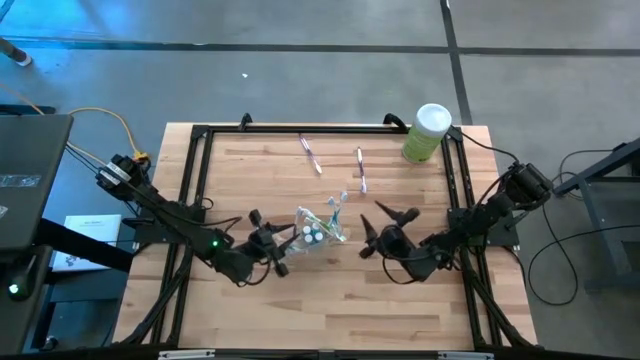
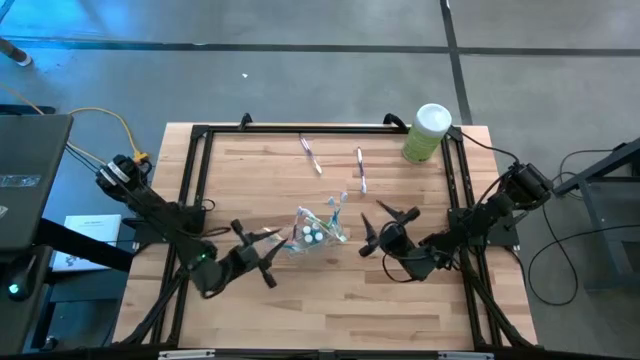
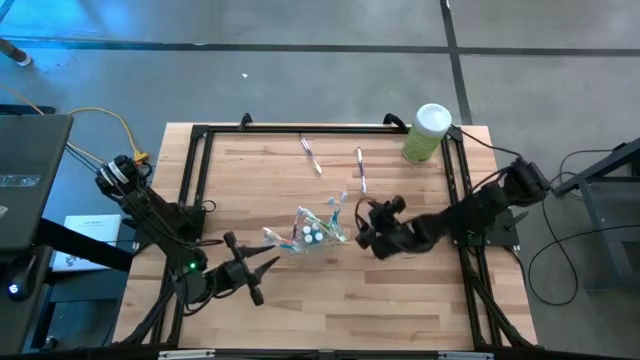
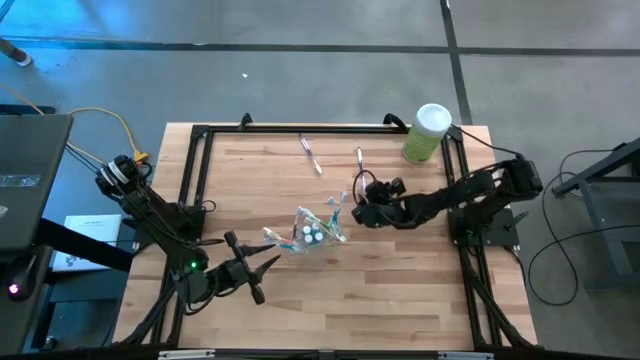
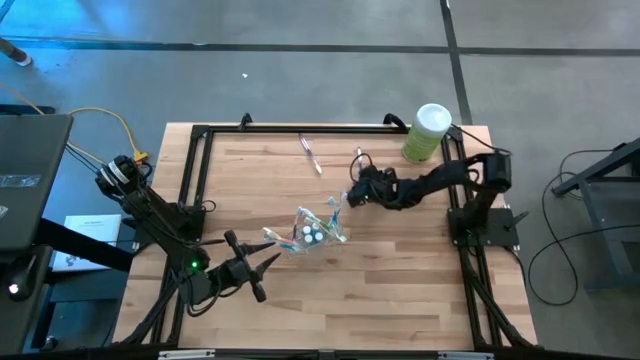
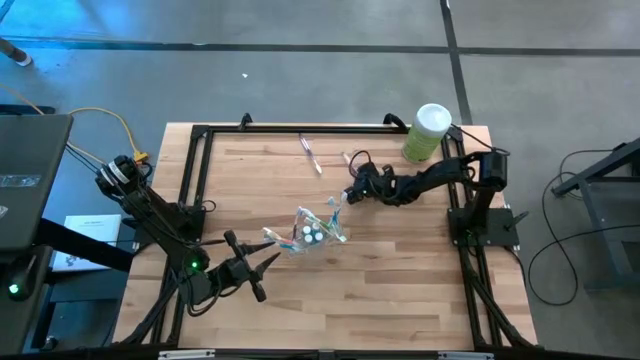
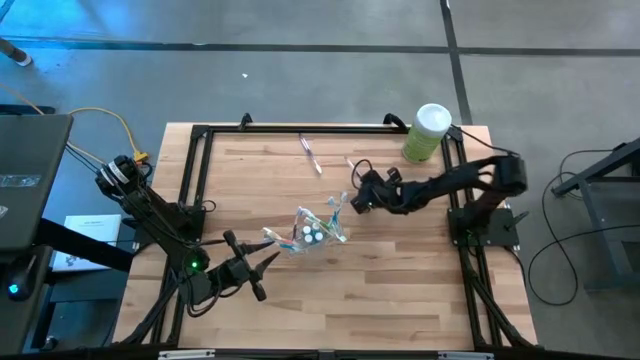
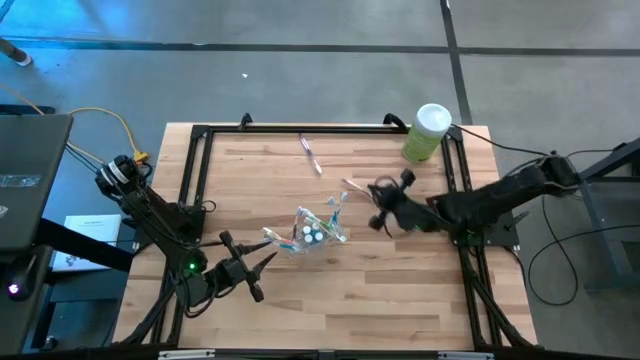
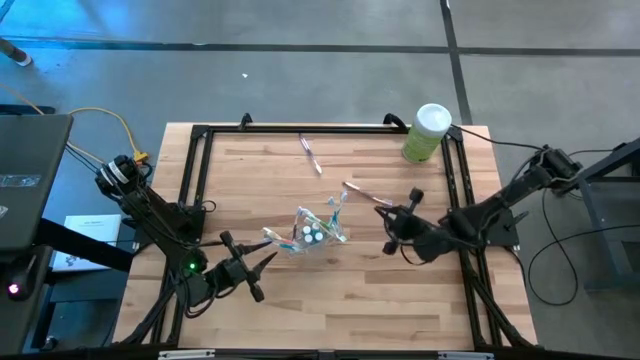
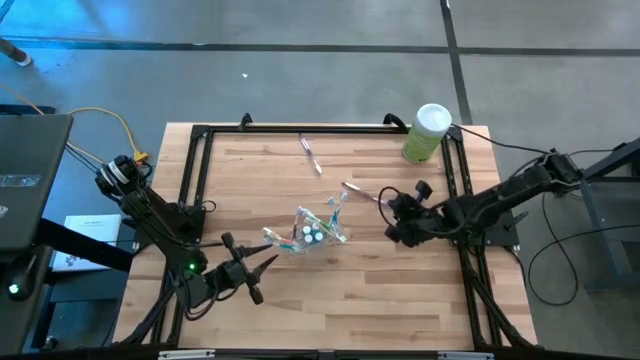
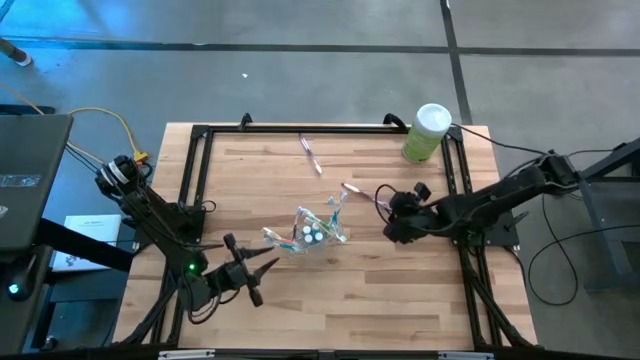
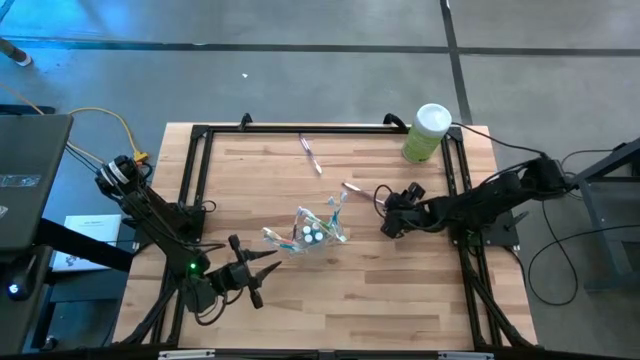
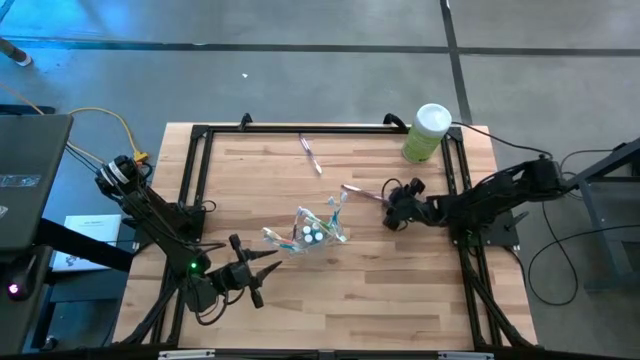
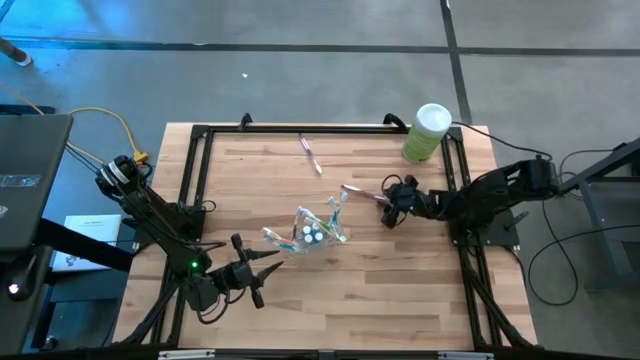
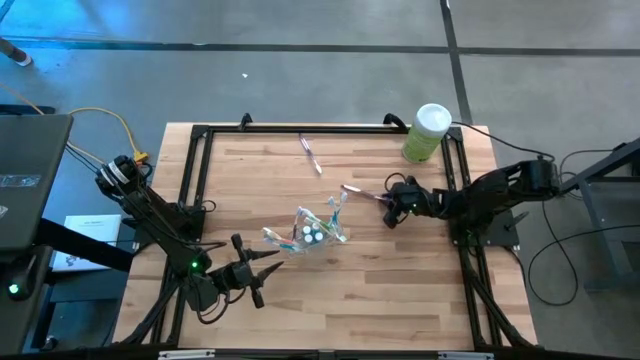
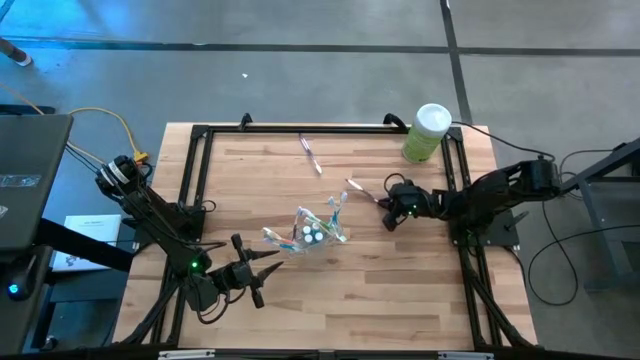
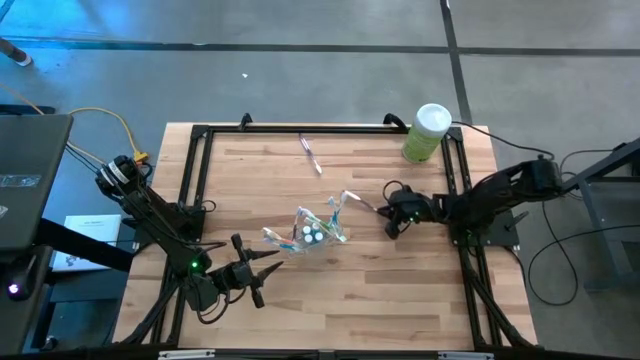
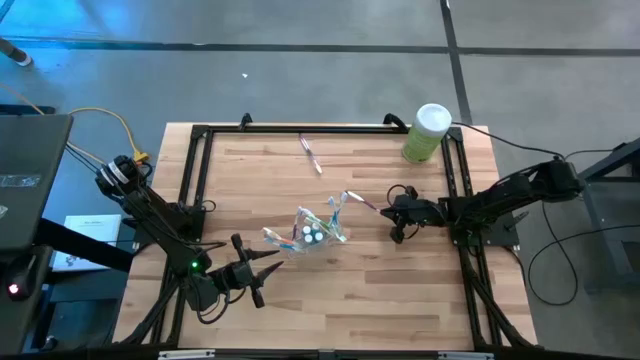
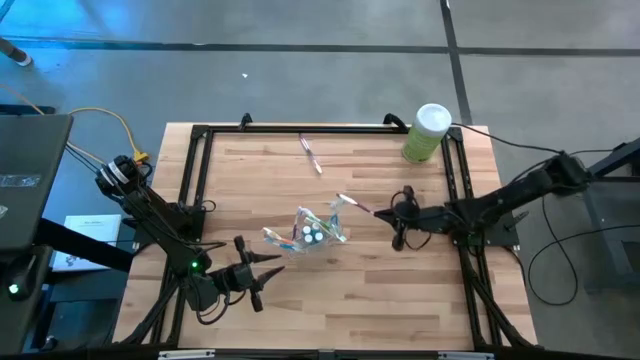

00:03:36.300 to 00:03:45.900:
Task: Pick & Place toothbrushing station
Put the violet toothbrush into the transparent organizer

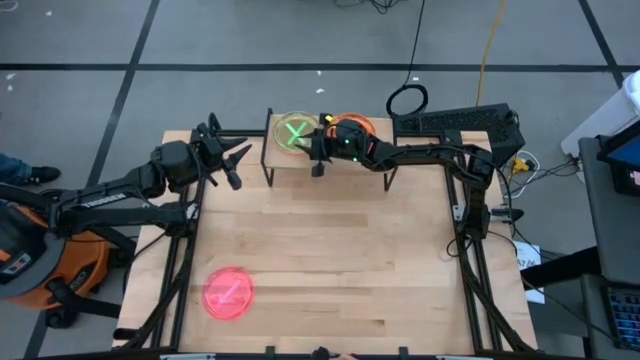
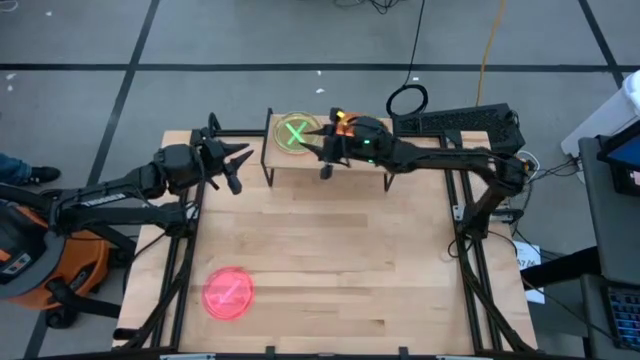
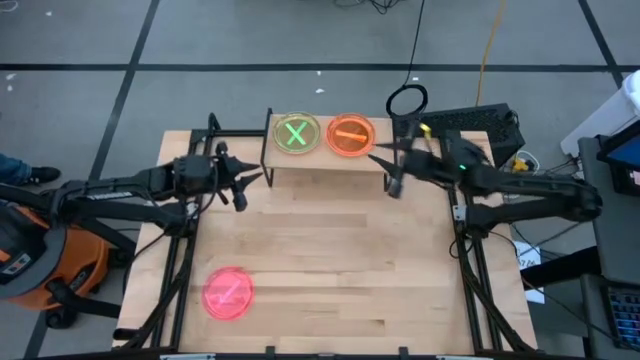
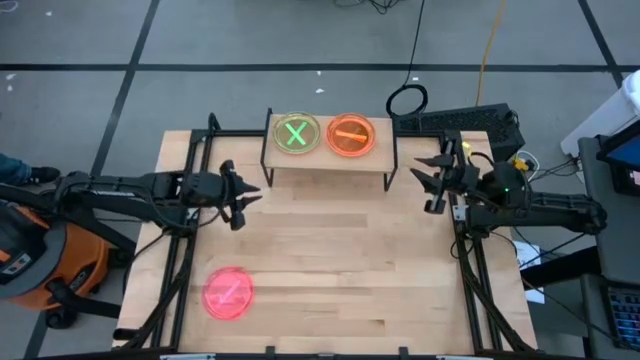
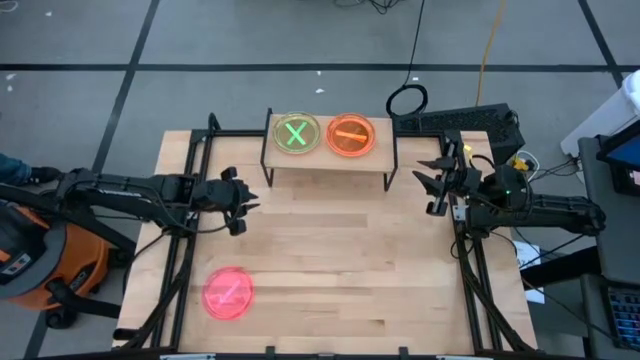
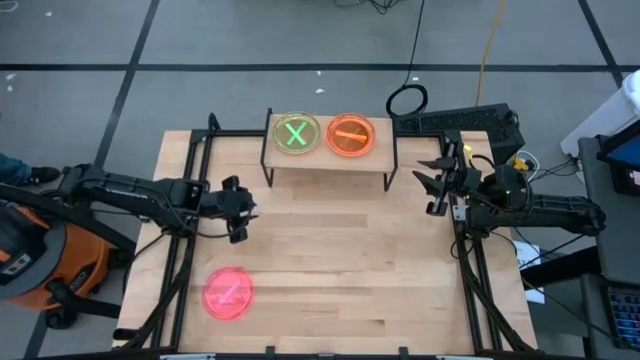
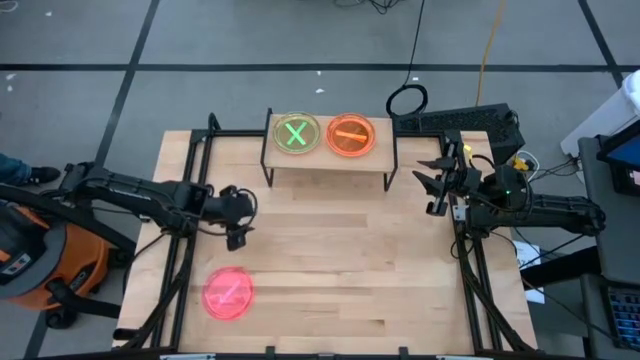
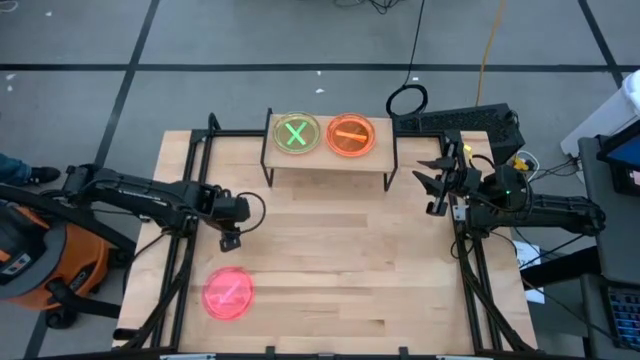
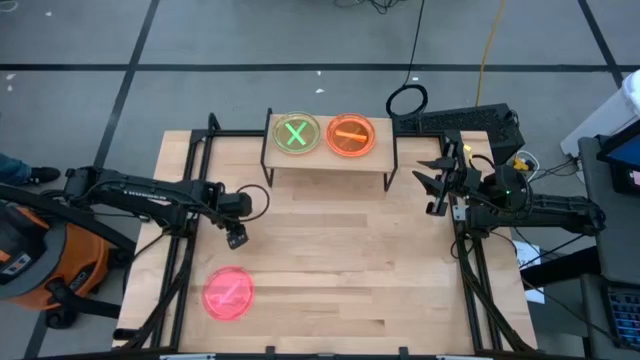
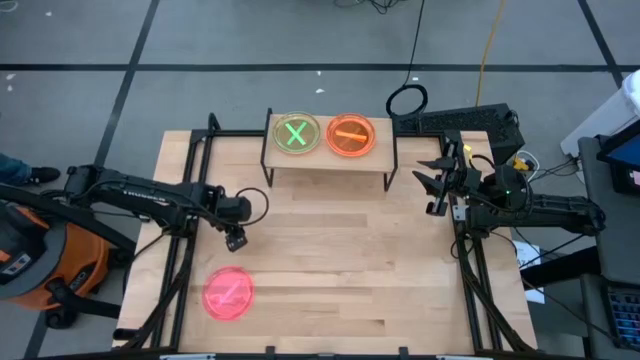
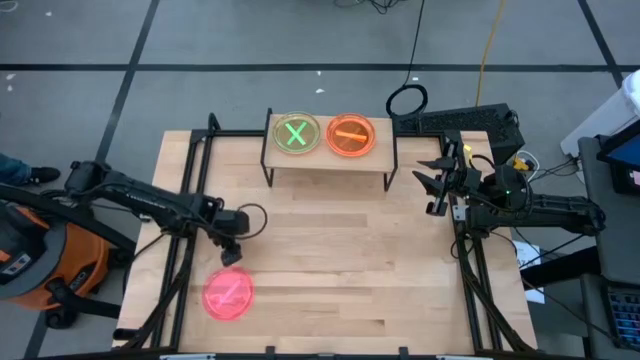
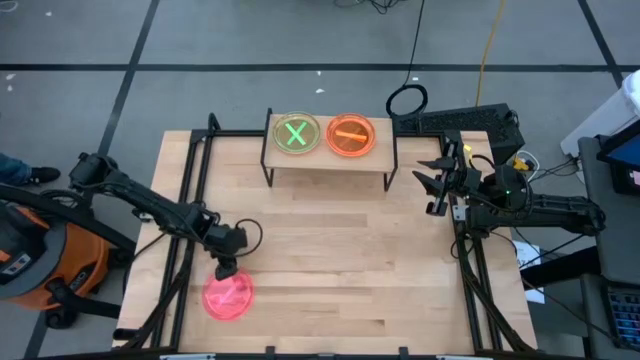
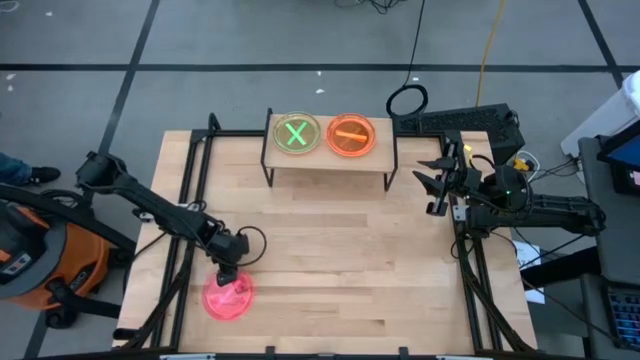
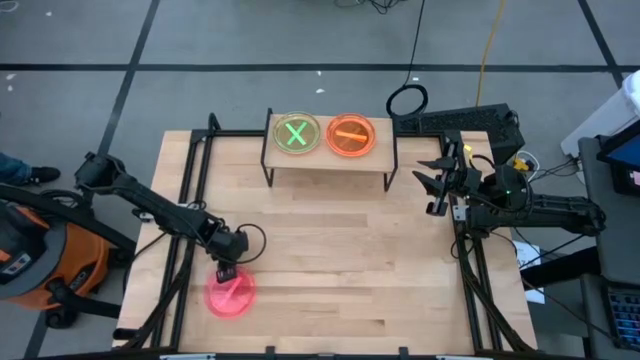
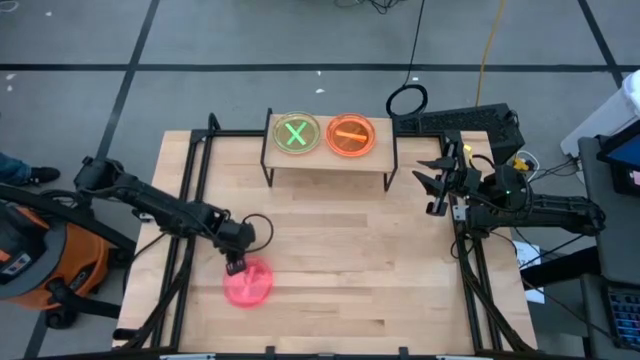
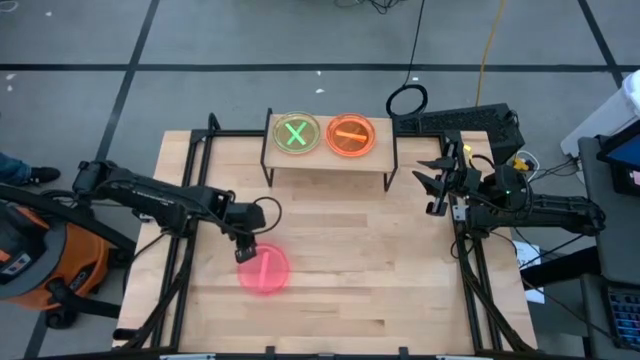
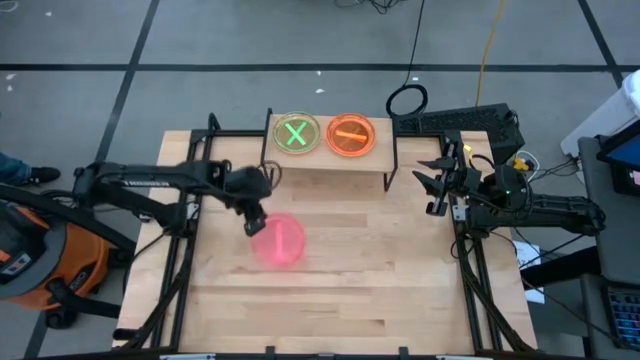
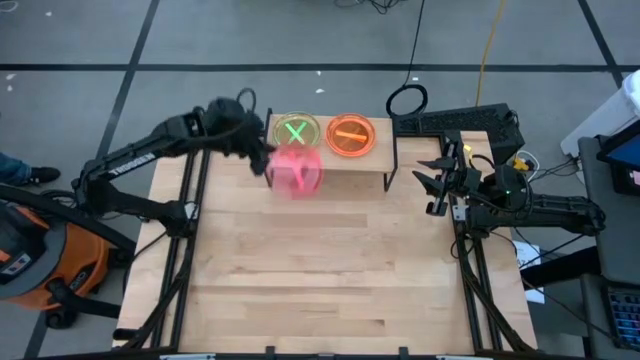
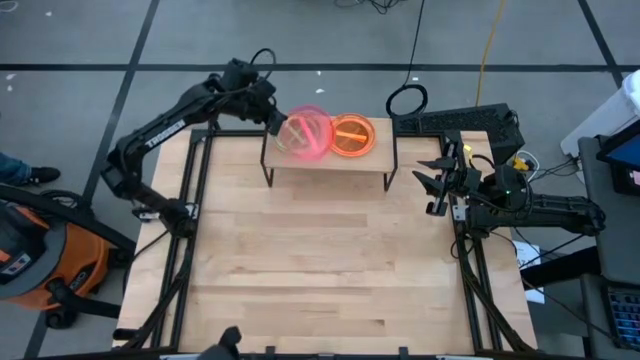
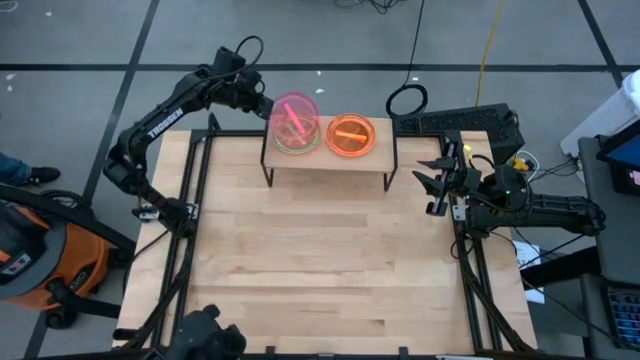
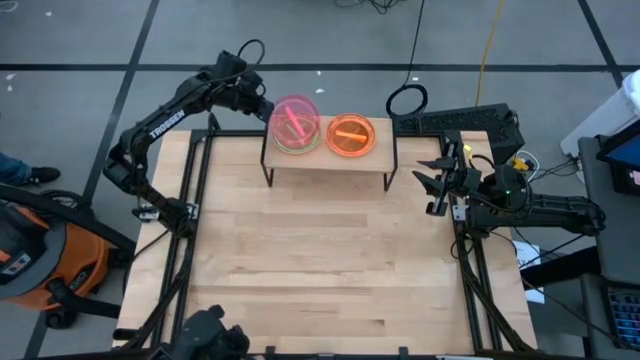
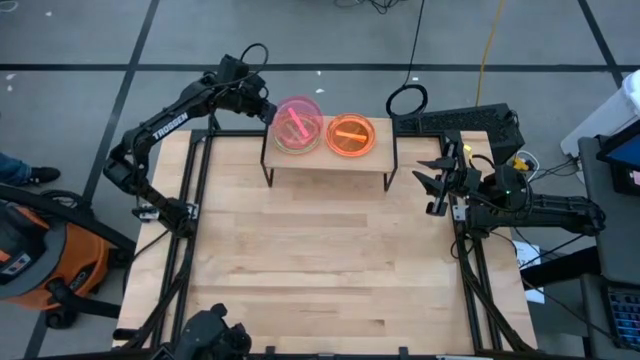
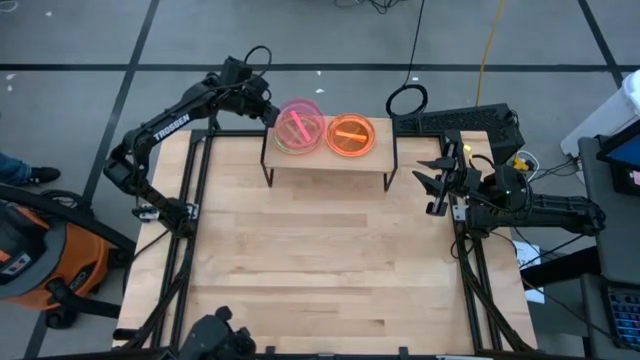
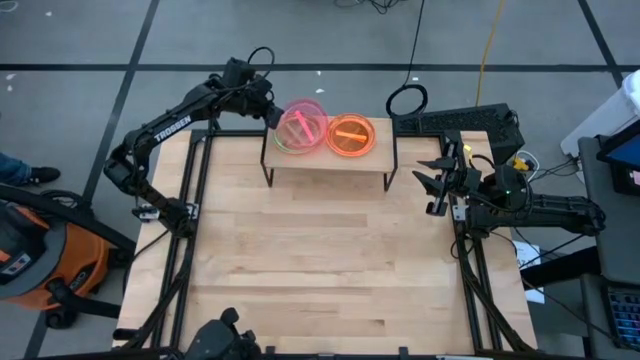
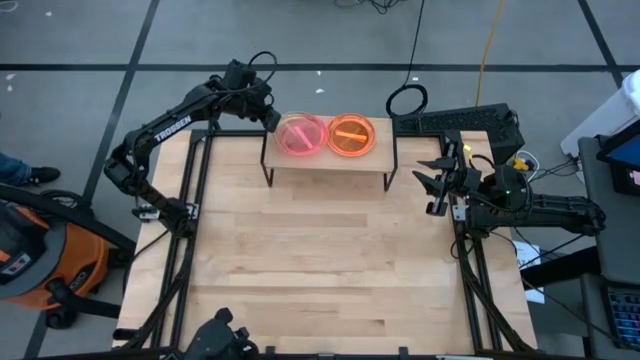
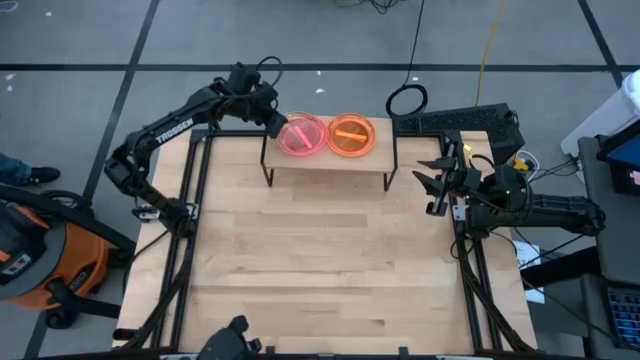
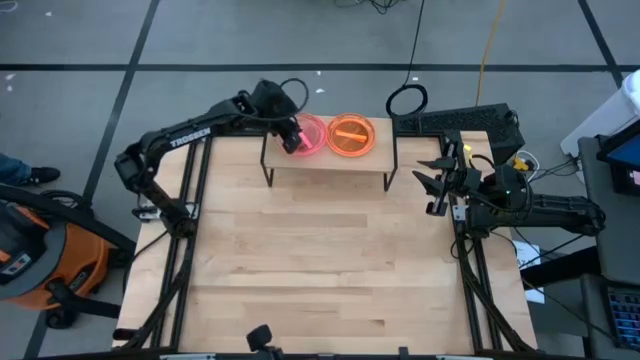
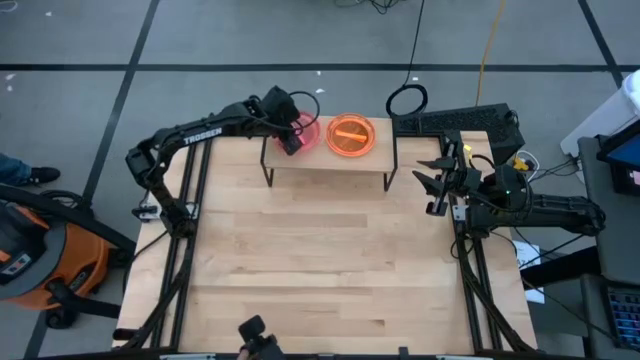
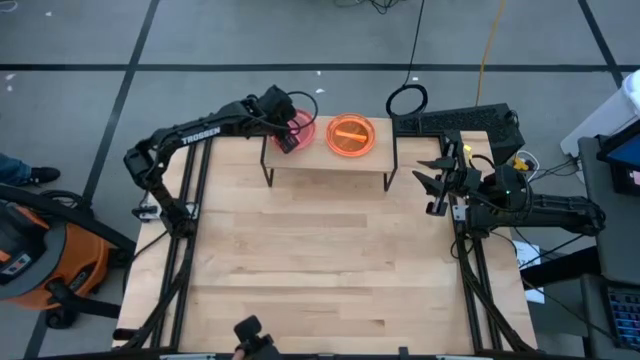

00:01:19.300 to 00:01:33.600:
Task: Place and stack plates onto a shelf
Stack the pink plate on the green plate on the shelf
